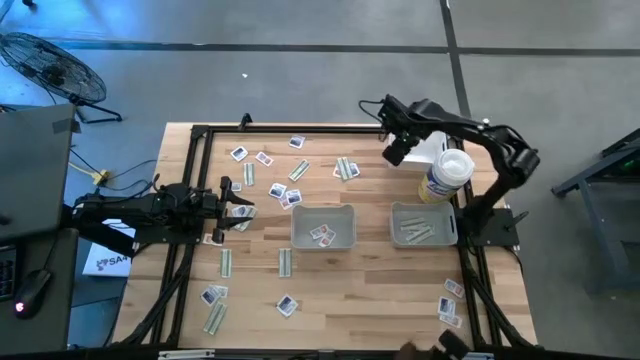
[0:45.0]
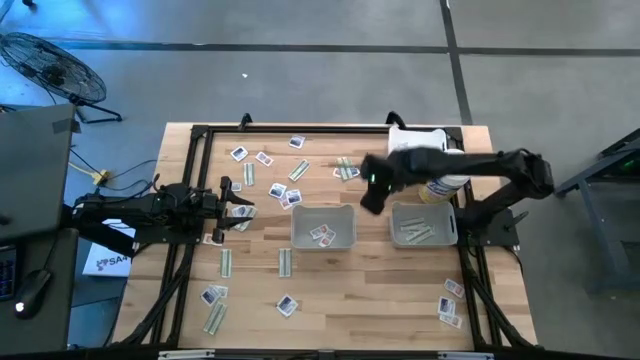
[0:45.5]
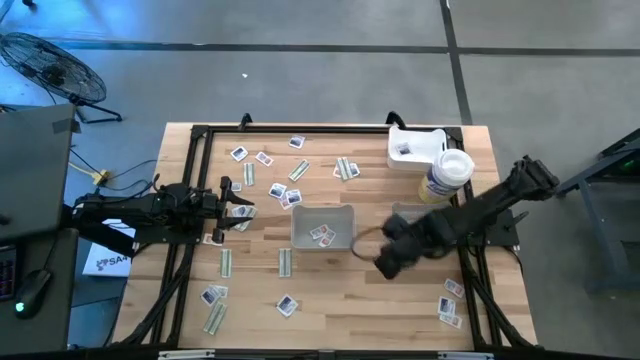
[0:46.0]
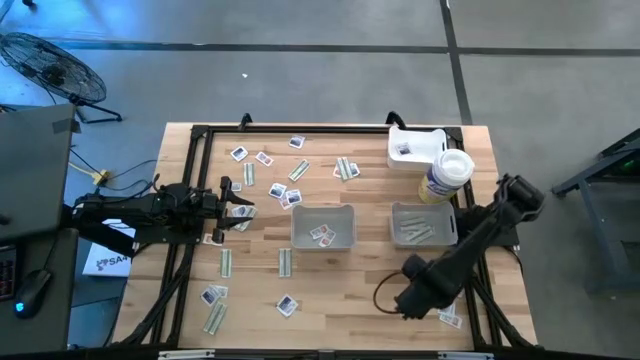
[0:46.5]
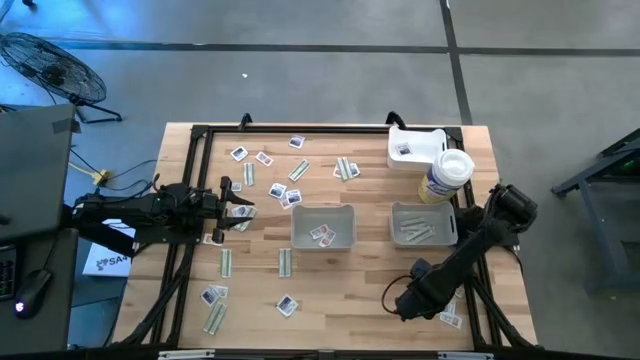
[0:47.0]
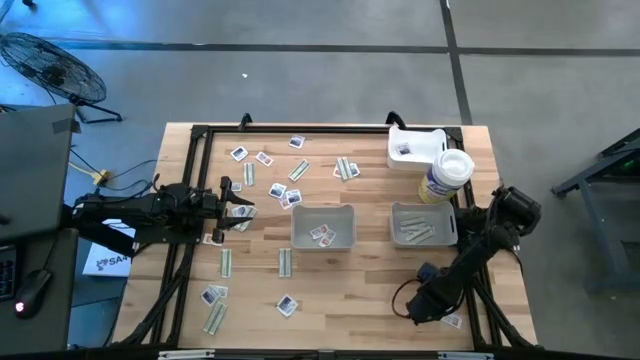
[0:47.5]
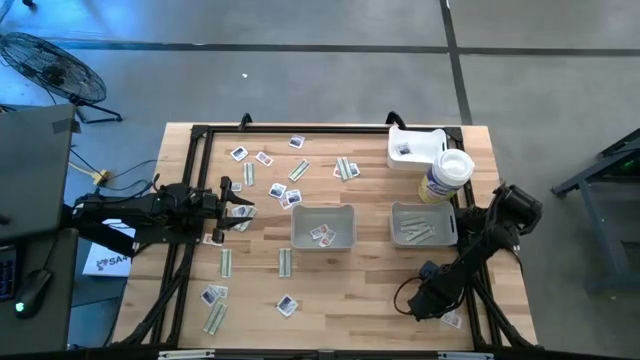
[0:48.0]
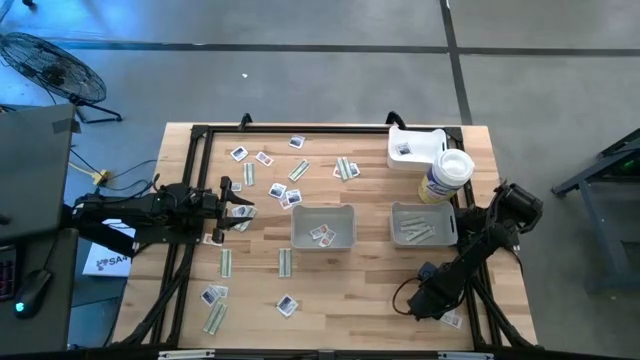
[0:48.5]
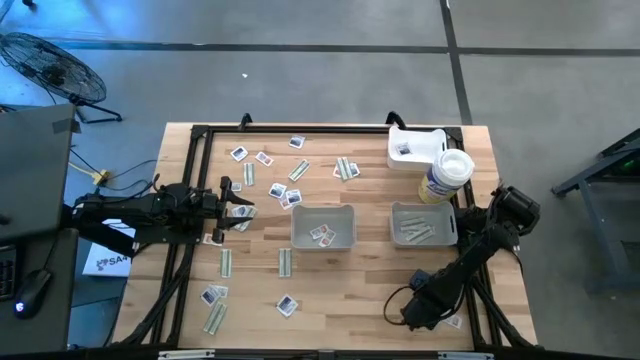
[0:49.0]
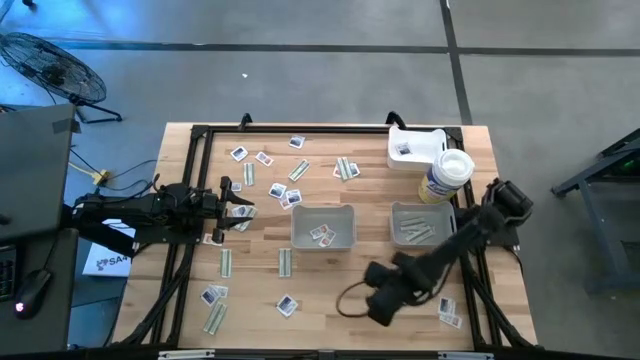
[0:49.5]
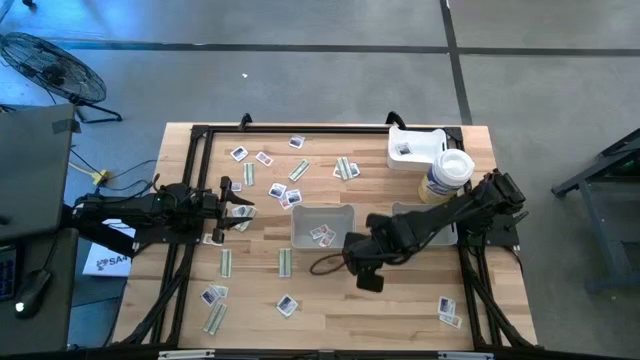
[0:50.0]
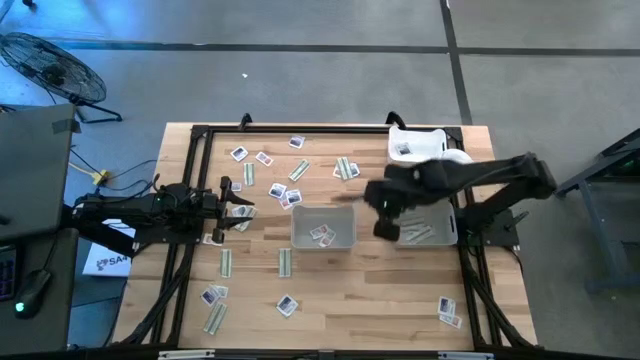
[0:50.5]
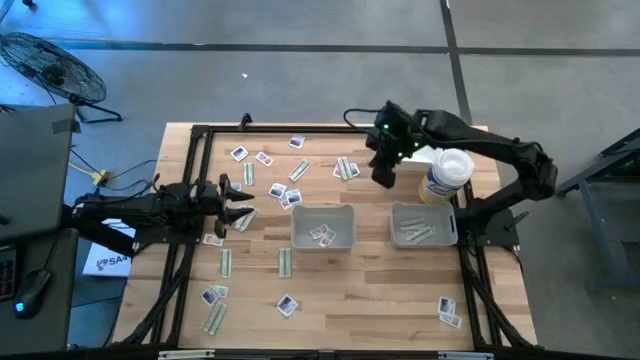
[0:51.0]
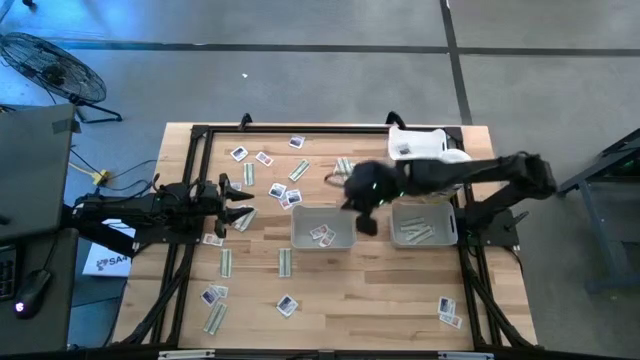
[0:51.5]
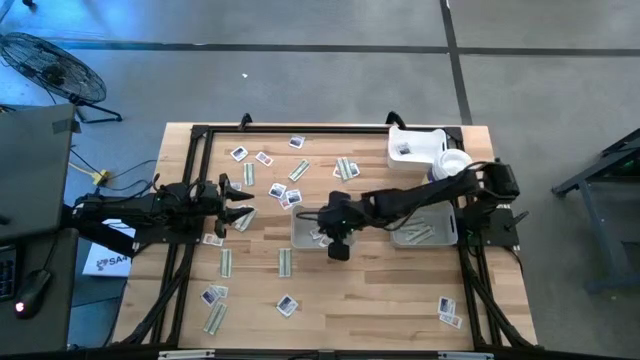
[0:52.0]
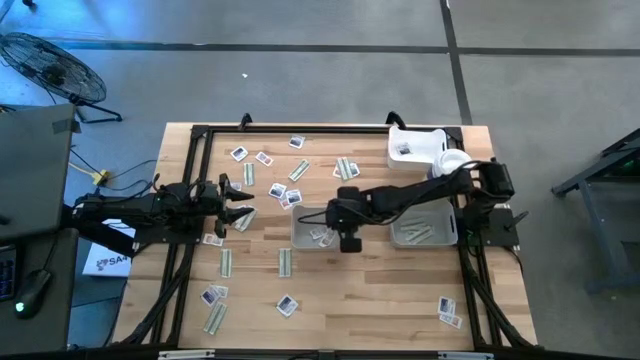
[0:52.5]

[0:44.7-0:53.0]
Task: Pick & Place First Aid Supplies
Put the orange pad into the left gray bin

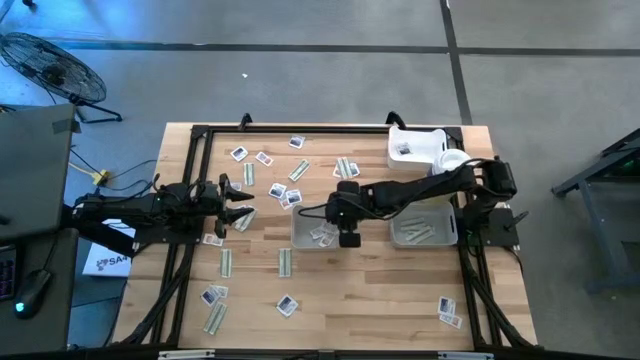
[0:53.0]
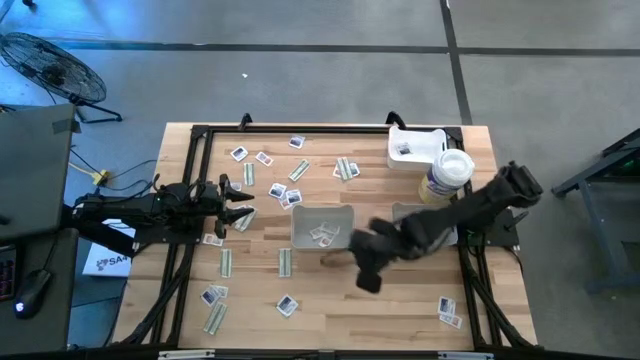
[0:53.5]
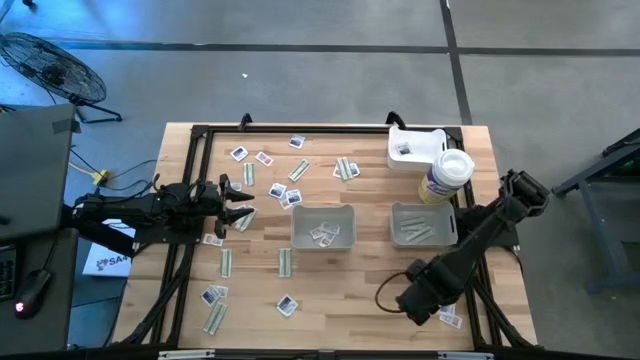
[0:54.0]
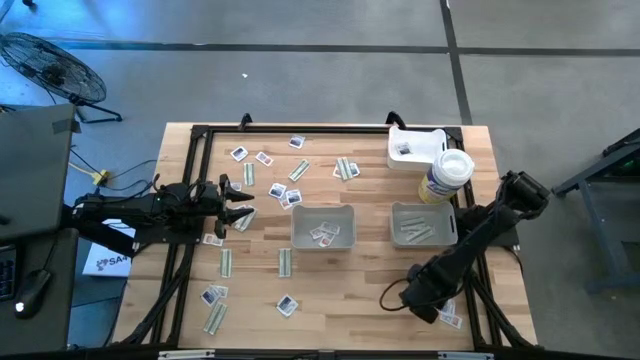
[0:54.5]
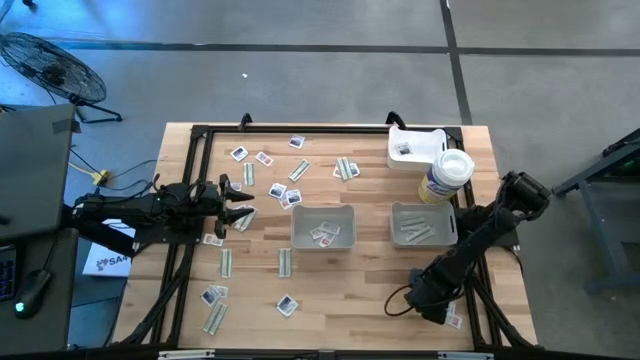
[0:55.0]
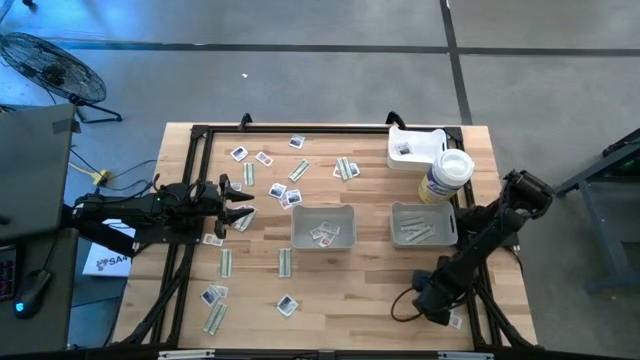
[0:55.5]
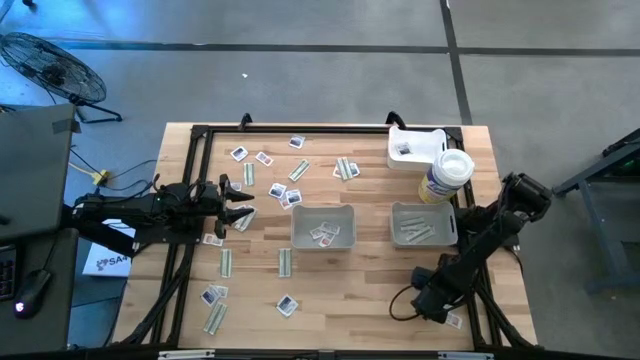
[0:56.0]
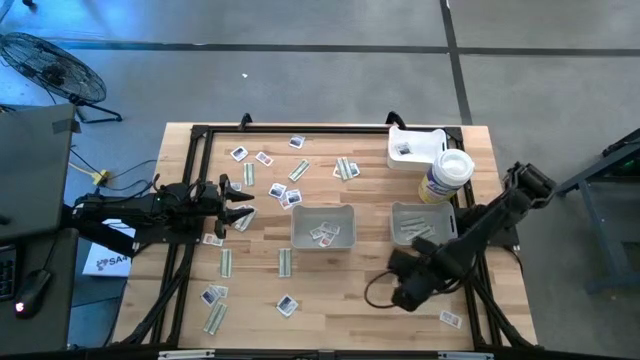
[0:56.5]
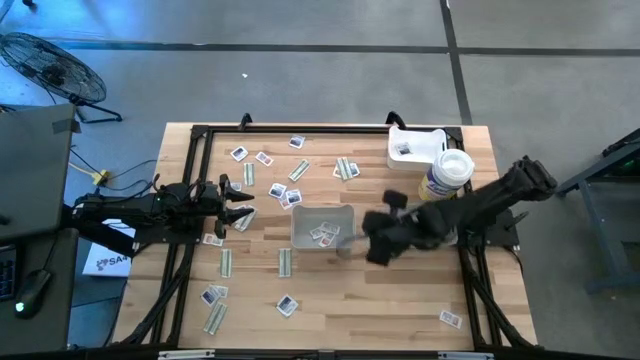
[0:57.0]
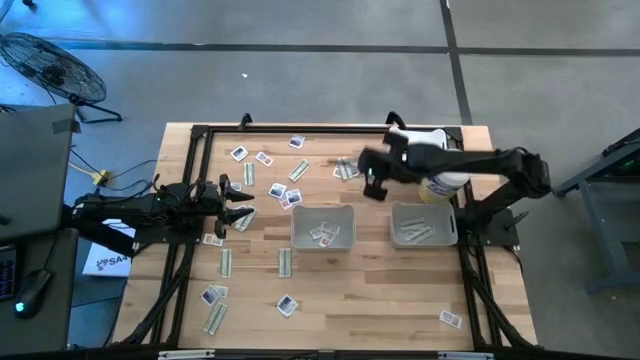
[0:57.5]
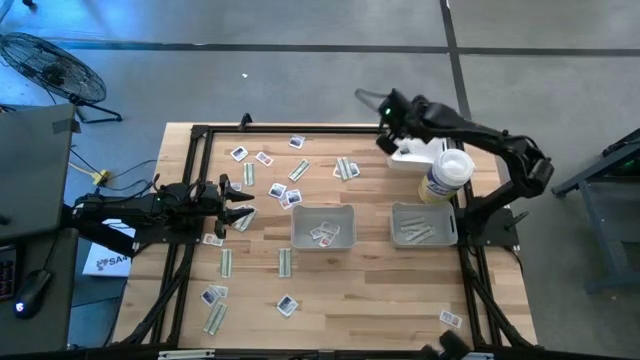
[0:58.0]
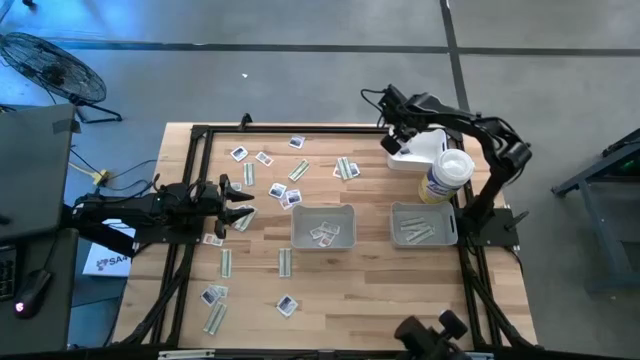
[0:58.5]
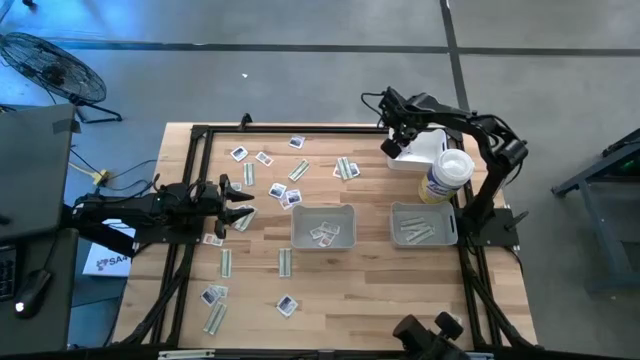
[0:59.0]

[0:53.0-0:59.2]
Put the blue pad into the white bin

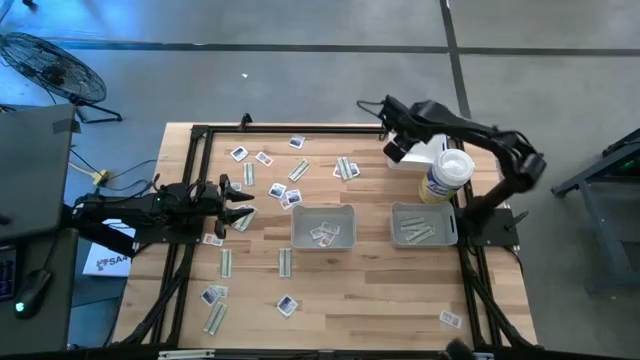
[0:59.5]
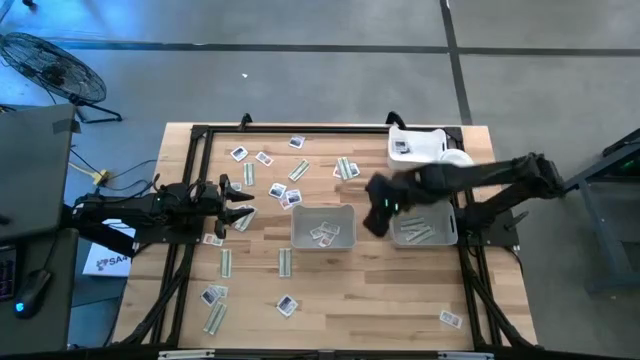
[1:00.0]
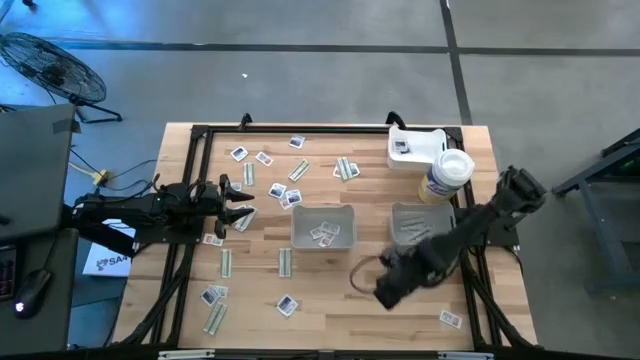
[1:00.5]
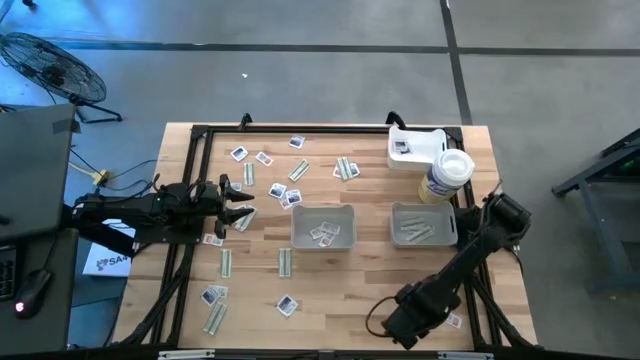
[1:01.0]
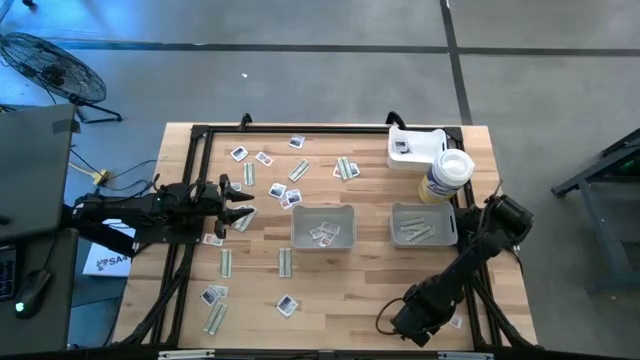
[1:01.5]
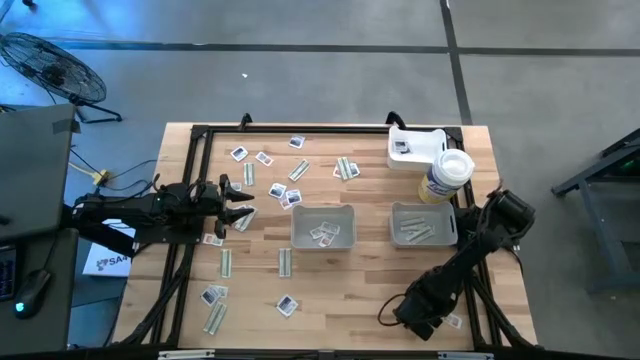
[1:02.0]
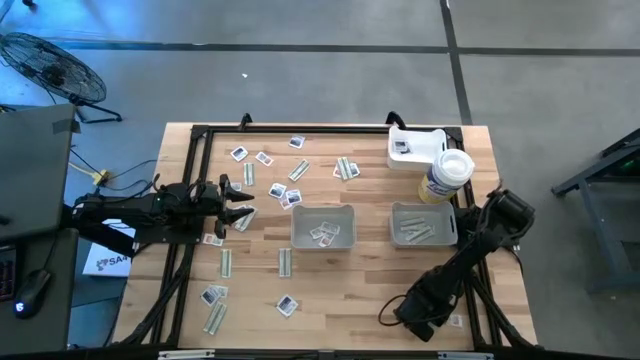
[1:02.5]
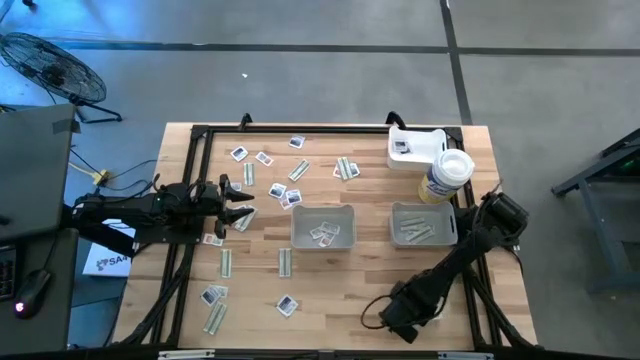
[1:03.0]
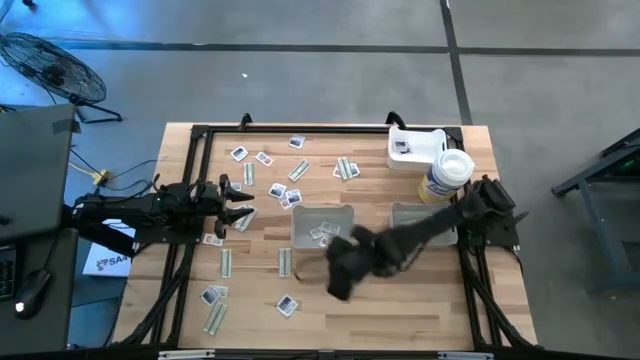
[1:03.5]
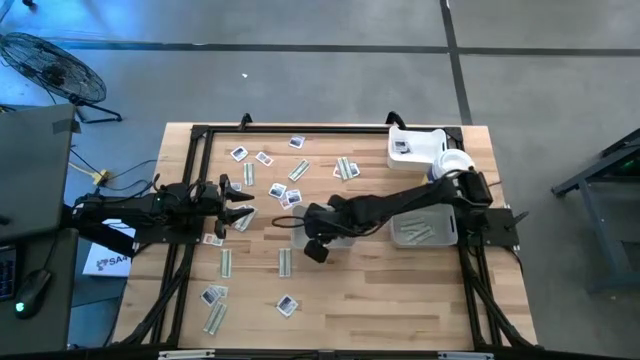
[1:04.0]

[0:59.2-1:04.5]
Put the orange pad into the left gray bin

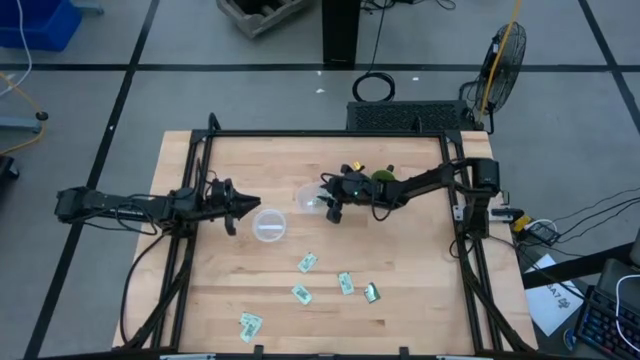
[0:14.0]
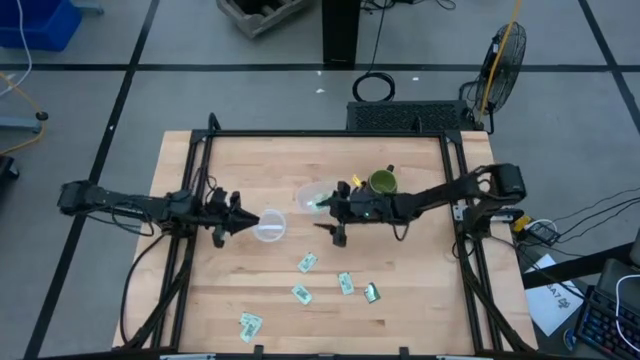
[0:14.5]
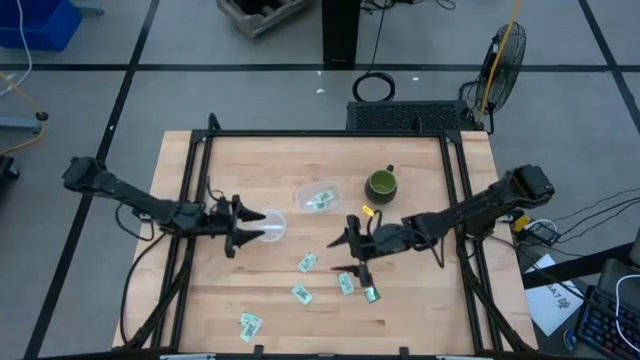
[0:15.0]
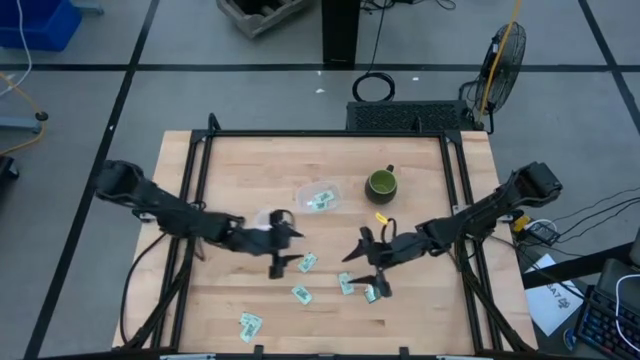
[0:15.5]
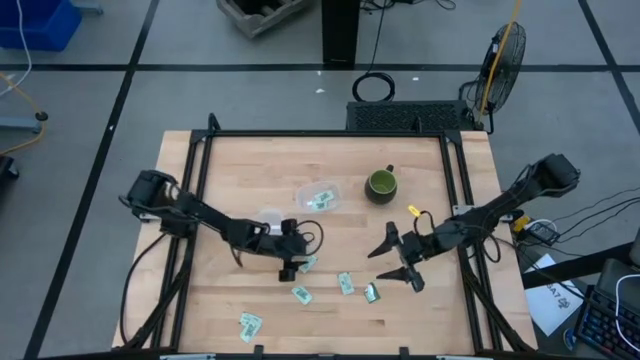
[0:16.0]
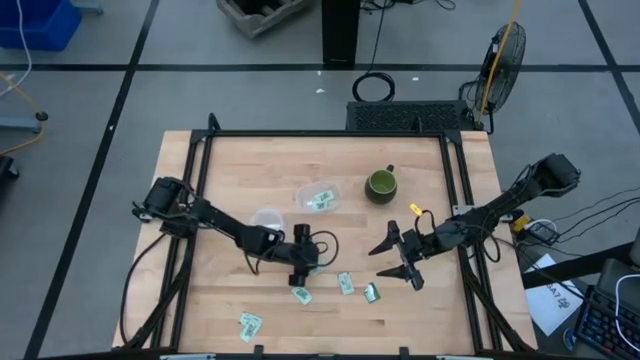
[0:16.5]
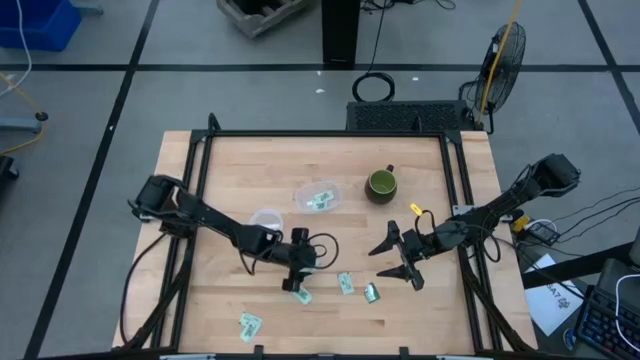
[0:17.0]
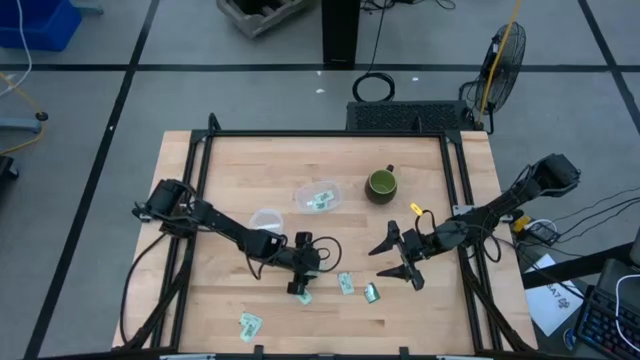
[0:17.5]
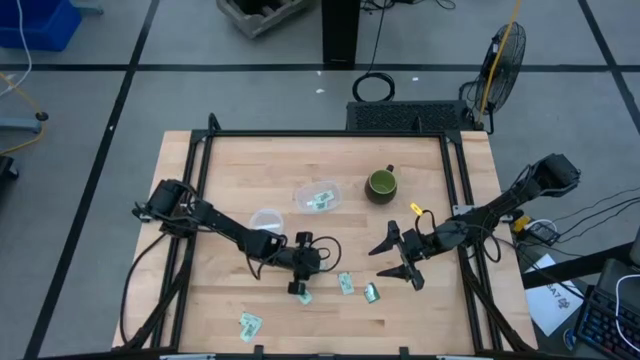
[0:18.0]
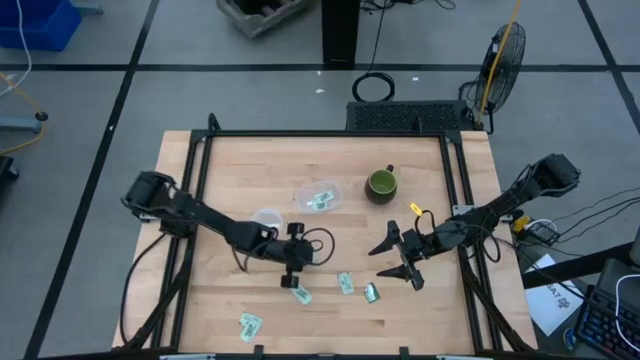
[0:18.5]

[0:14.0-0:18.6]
Task: Pick and place Stevia / Truvia into bins
Put the stevia packet into the round container
